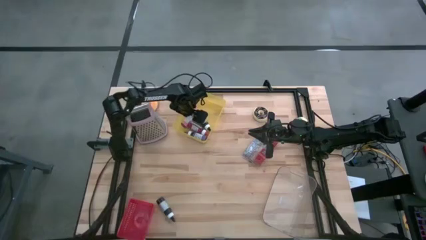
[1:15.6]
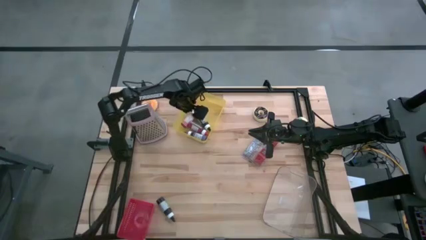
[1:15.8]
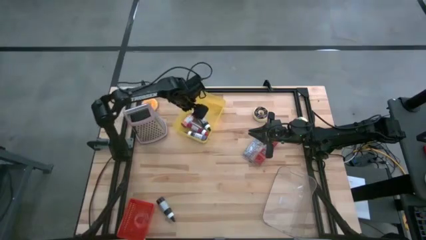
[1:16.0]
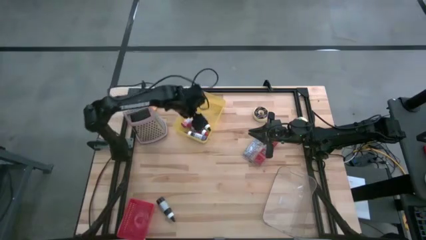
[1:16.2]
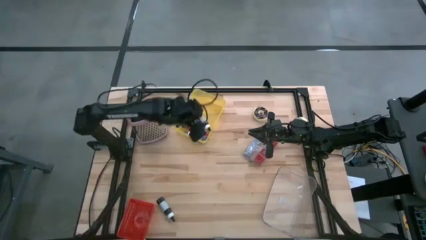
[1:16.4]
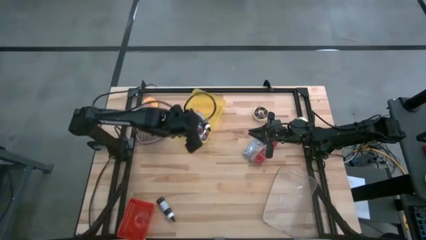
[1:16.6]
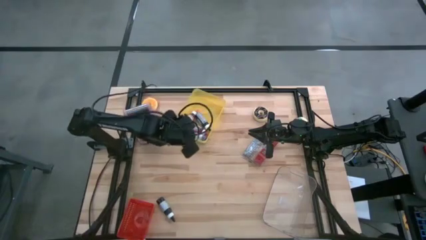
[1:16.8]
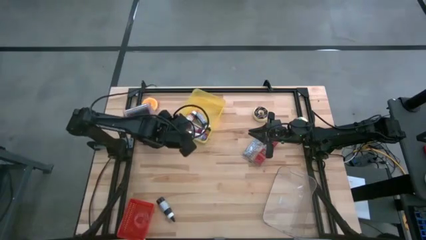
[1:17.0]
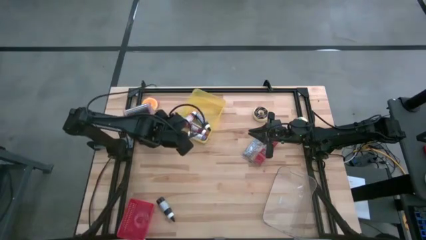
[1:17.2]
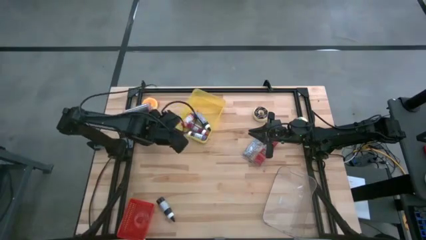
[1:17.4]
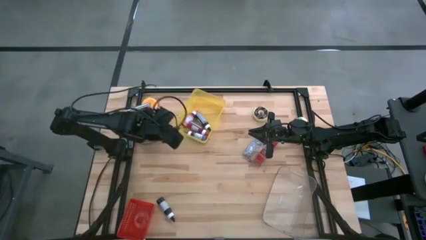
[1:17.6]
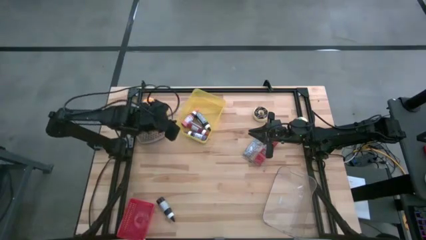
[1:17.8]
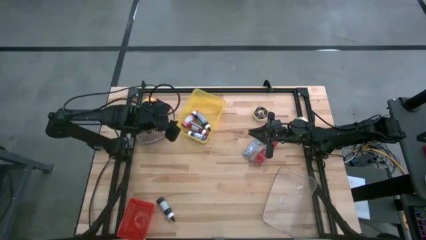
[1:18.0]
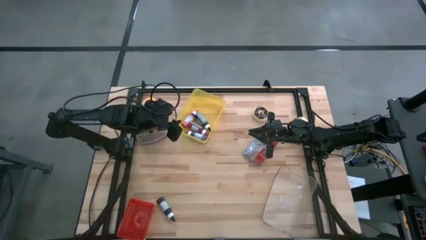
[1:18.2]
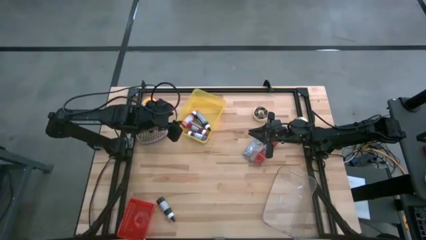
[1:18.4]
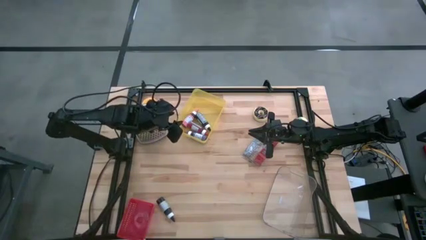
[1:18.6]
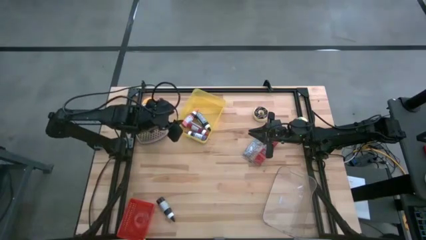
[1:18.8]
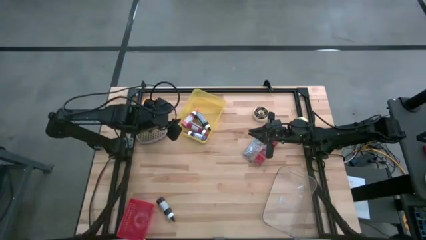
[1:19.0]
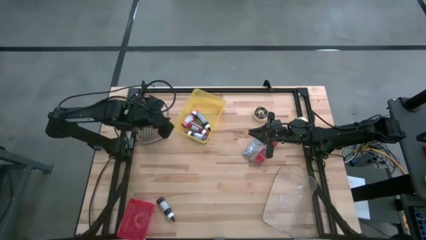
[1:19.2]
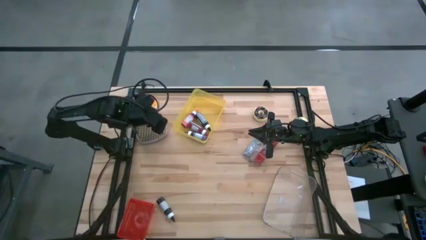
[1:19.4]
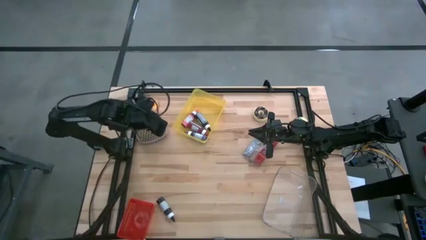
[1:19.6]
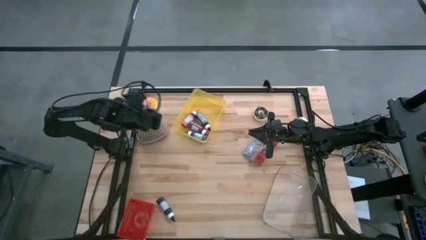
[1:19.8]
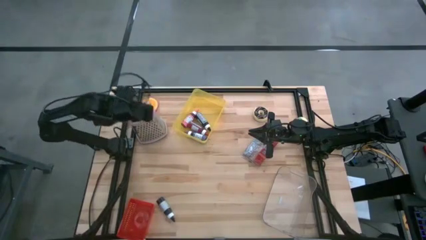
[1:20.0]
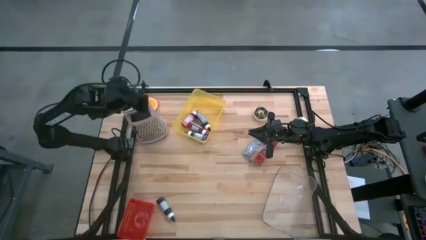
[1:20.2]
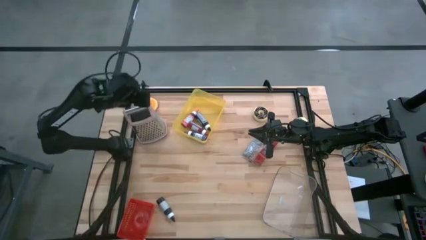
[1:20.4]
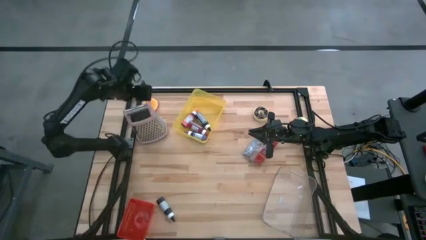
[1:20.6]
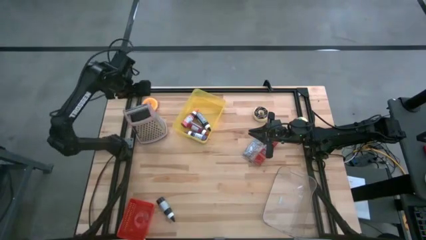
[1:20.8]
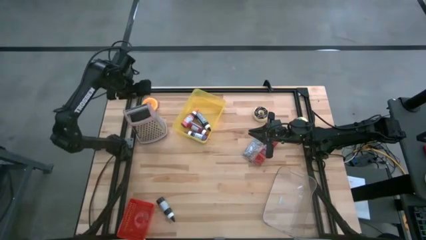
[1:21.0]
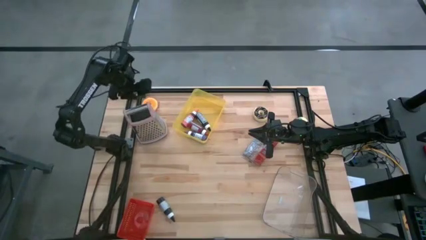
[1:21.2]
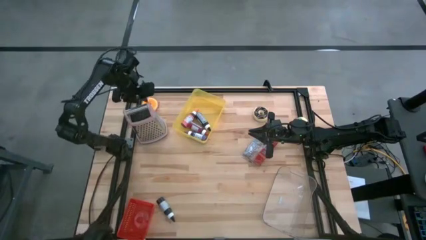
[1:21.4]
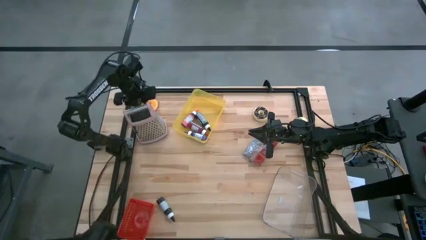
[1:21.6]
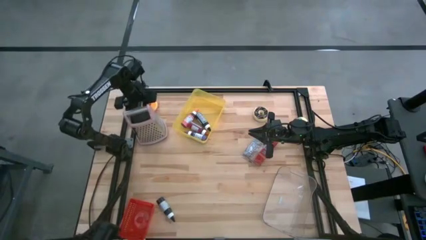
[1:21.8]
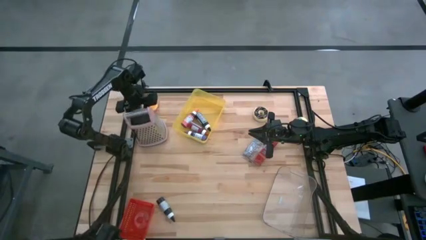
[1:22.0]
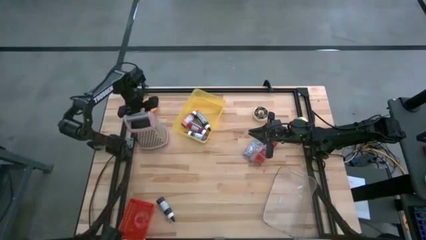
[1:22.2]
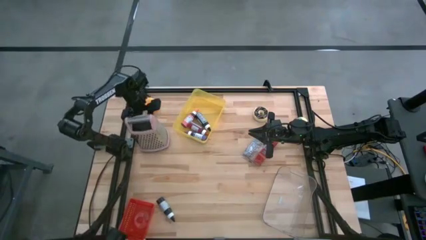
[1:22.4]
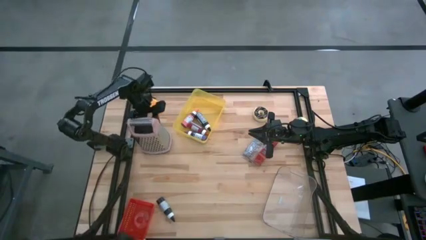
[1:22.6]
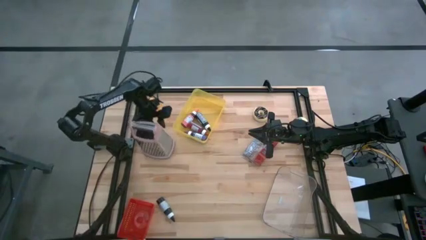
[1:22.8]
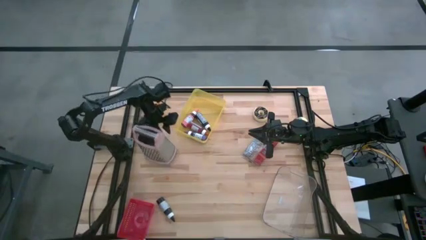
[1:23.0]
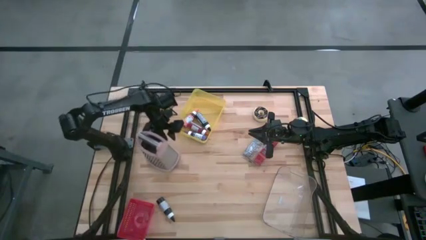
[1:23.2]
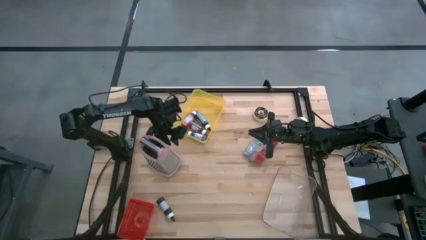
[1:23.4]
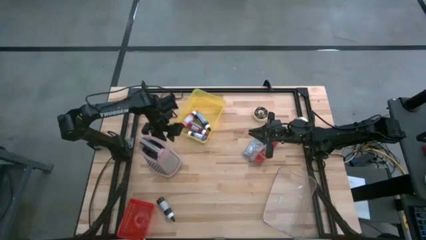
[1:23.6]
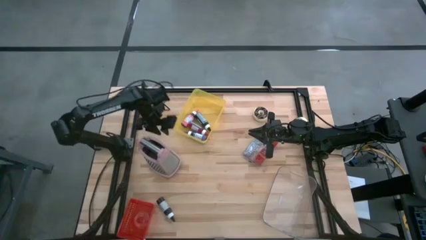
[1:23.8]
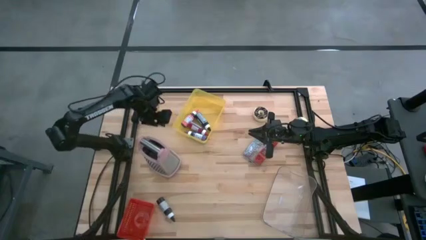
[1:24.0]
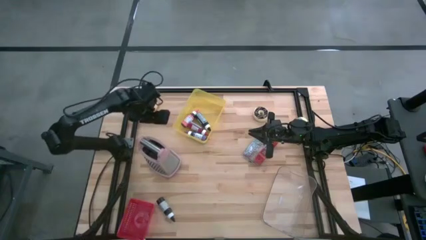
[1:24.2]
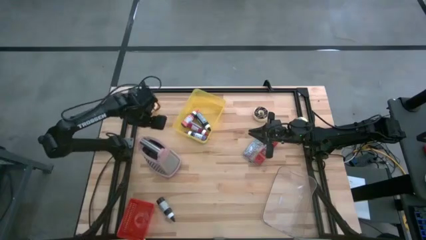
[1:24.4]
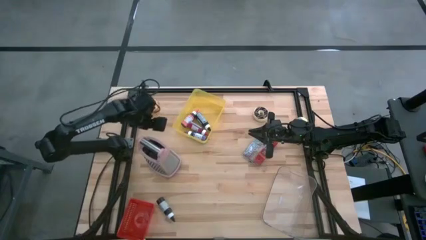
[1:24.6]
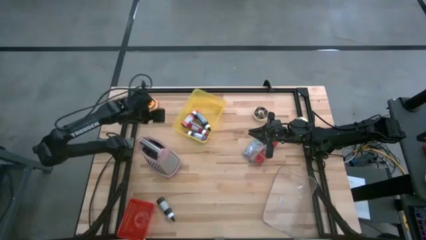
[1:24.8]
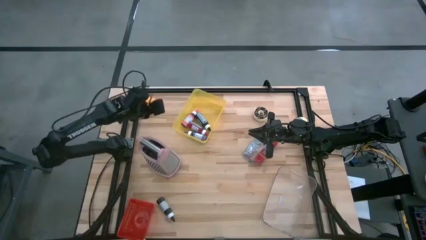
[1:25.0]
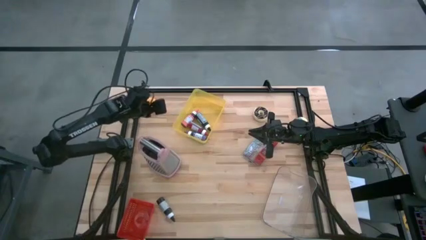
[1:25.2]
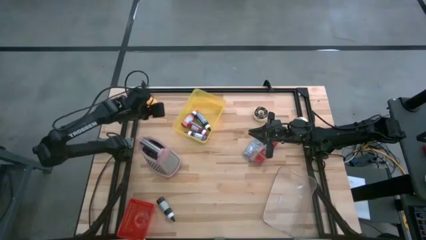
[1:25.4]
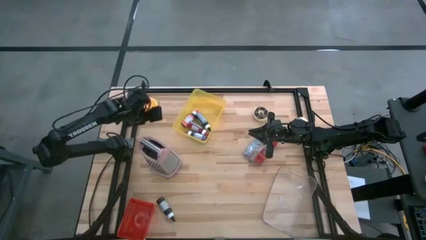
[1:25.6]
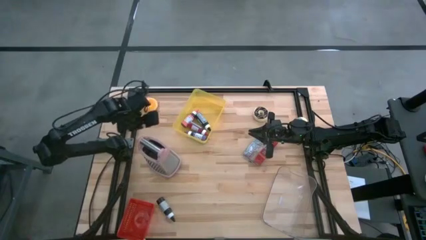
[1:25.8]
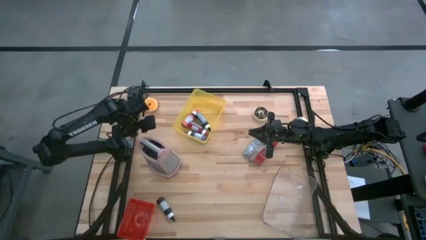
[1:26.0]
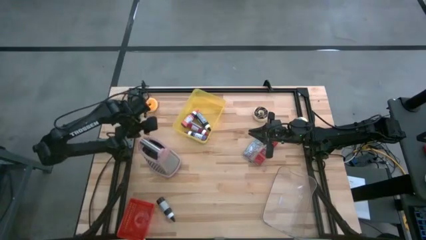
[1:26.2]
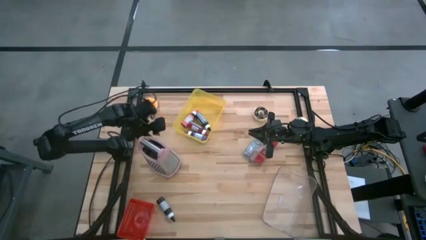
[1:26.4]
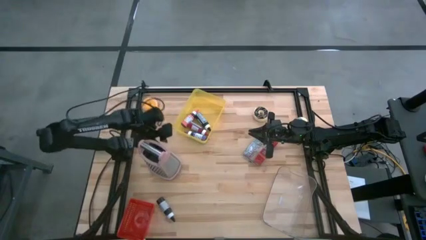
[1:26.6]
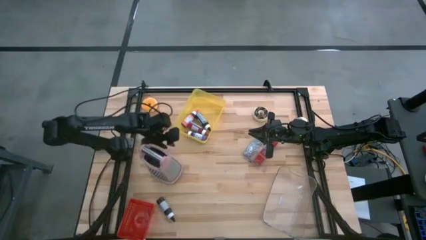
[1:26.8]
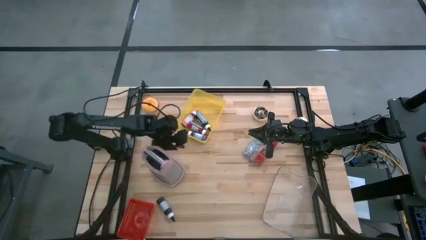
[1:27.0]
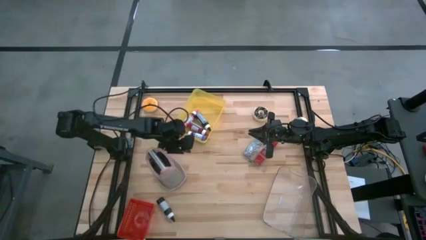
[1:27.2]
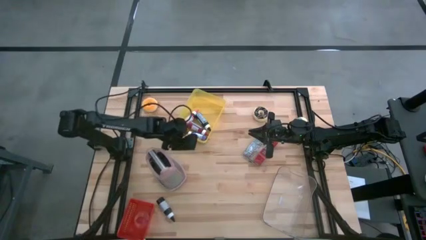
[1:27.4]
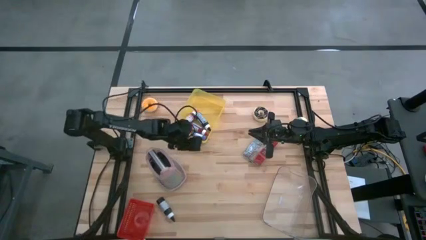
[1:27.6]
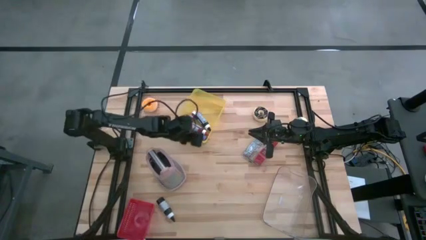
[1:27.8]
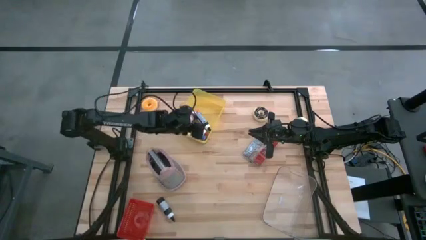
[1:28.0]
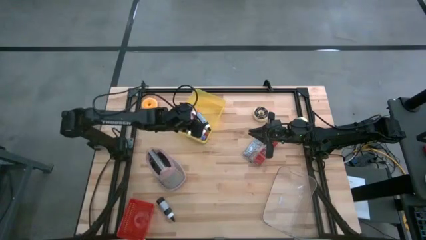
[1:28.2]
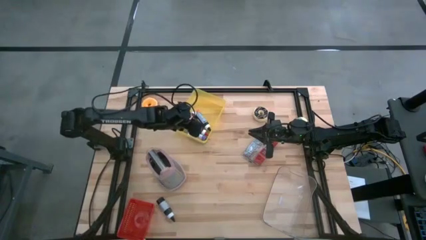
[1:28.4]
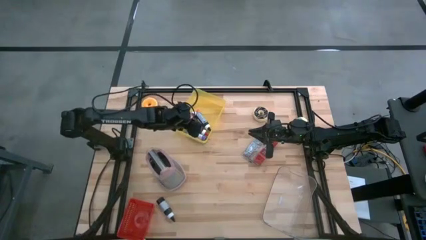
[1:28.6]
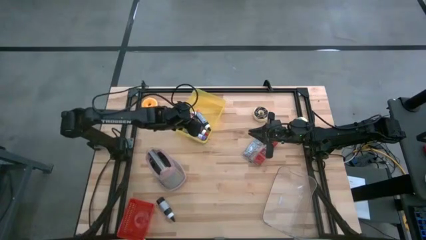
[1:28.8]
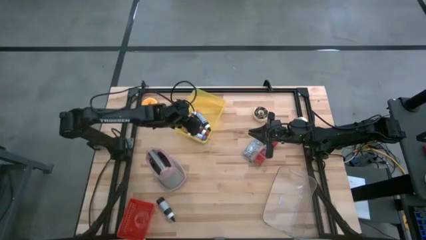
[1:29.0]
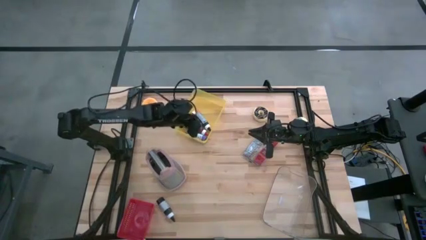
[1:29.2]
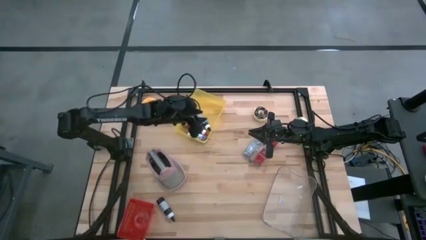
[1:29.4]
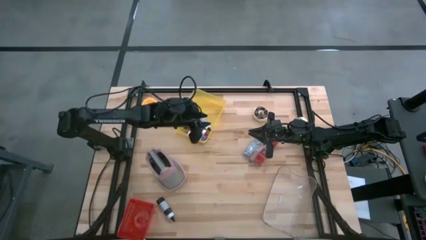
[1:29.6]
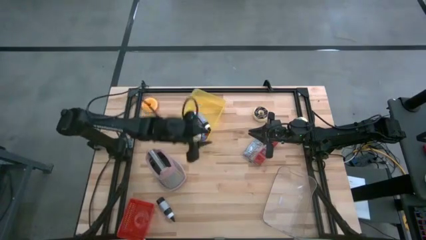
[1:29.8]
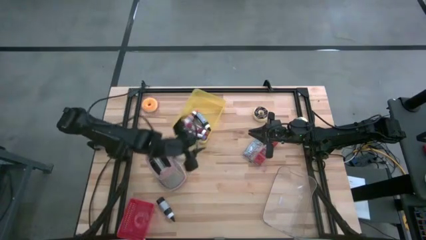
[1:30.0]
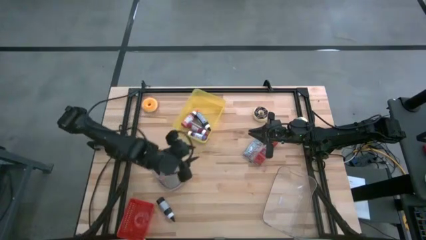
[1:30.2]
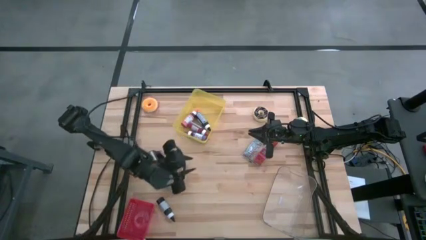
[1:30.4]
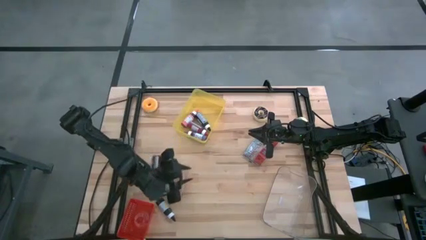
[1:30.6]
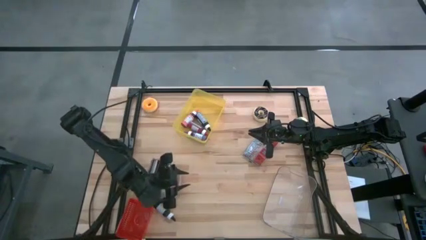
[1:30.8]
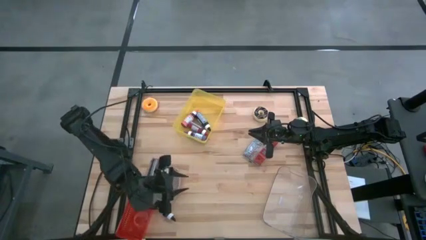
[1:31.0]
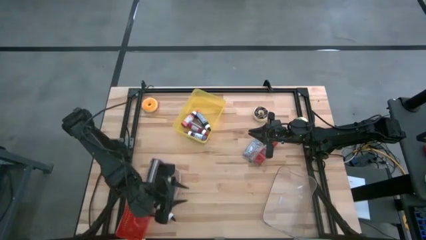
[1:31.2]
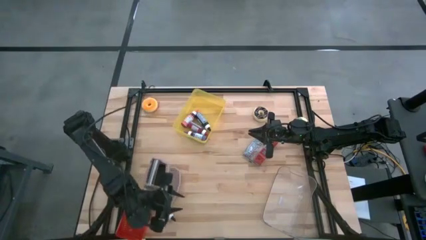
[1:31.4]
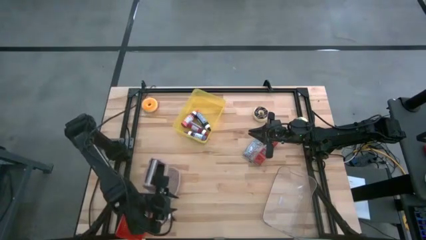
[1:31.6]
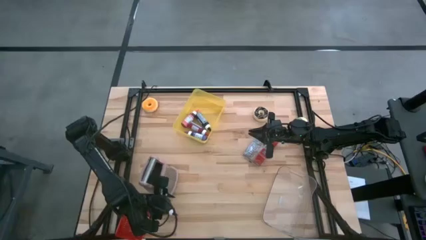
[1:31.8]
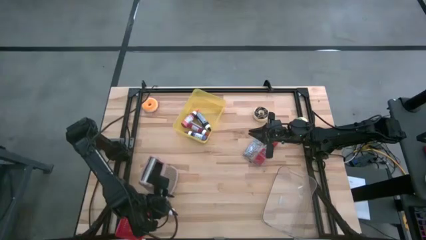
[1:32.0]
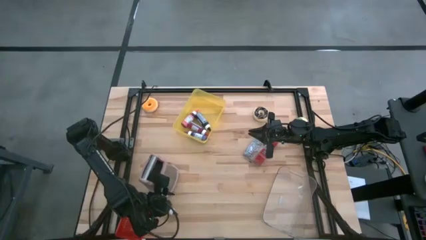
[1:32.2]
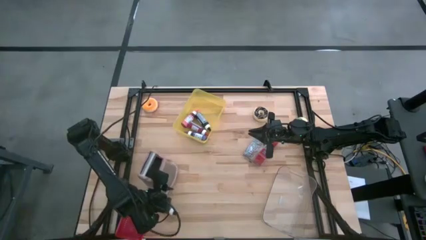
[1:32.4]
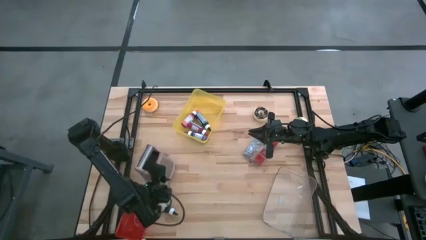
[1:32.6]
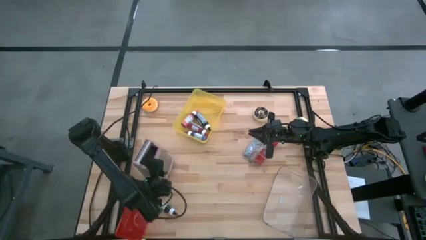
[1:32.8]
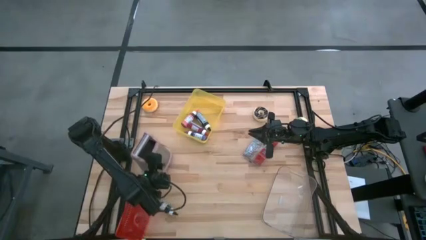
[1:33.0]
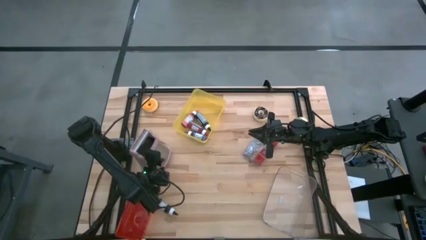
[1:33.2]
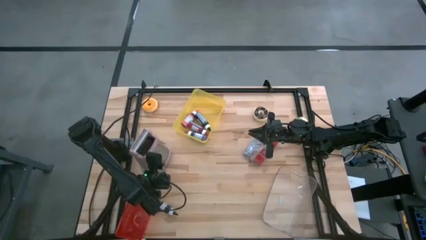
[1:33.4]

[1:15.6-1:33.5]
Task: Pick & Place Food Item
Move the pink grater to the middle left of the table
